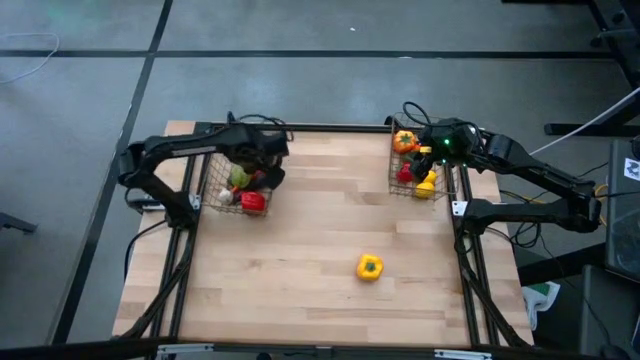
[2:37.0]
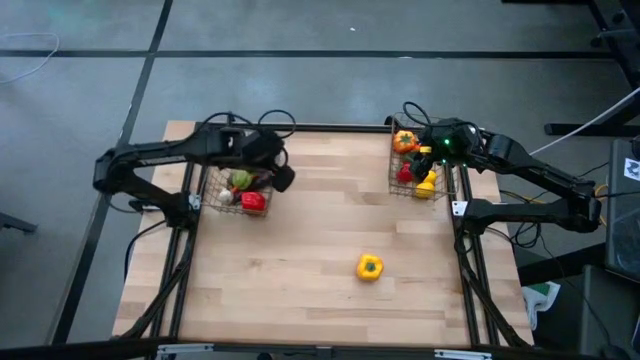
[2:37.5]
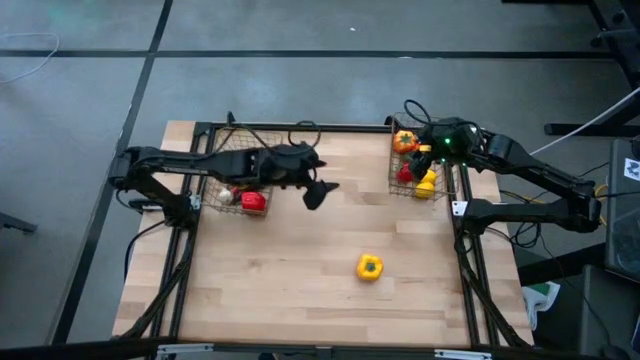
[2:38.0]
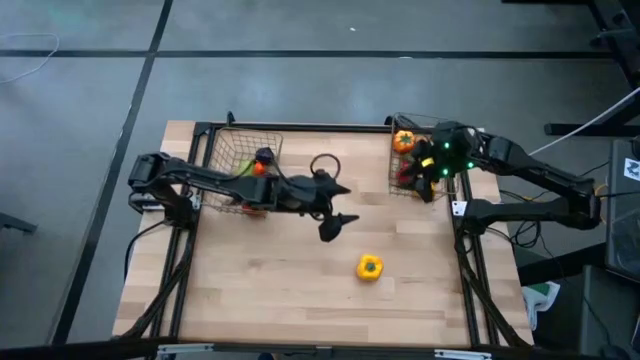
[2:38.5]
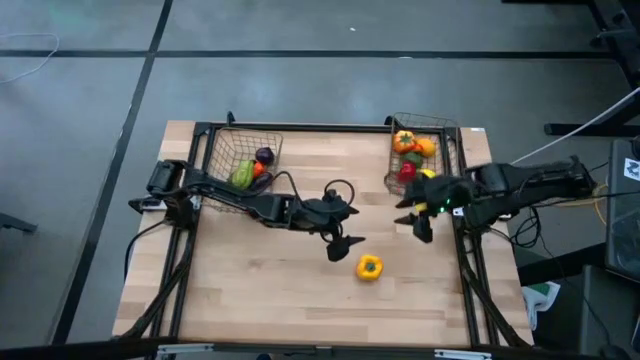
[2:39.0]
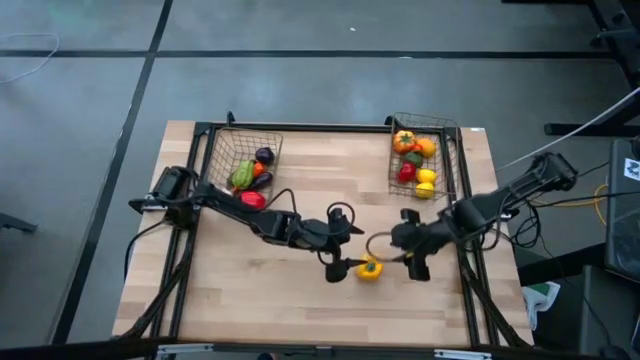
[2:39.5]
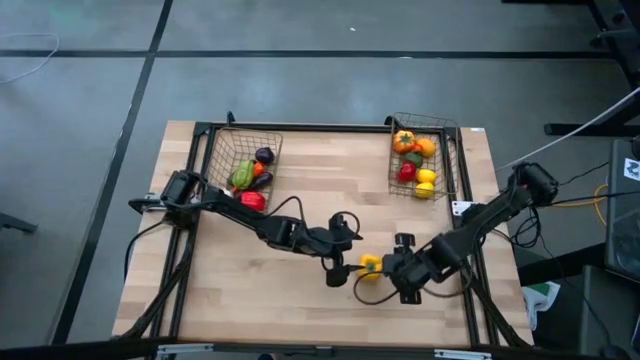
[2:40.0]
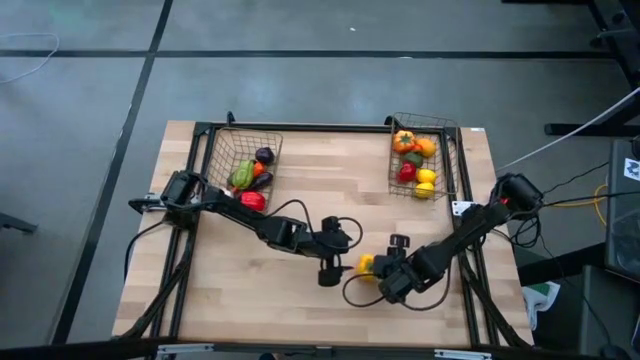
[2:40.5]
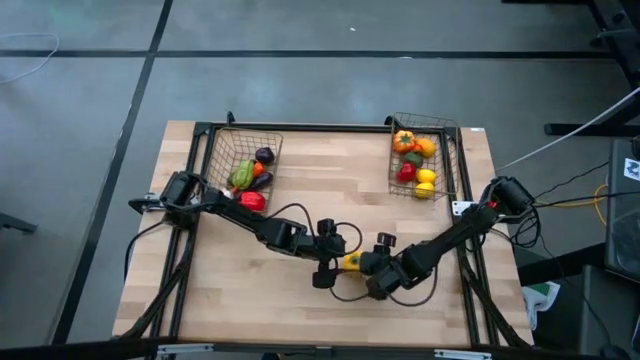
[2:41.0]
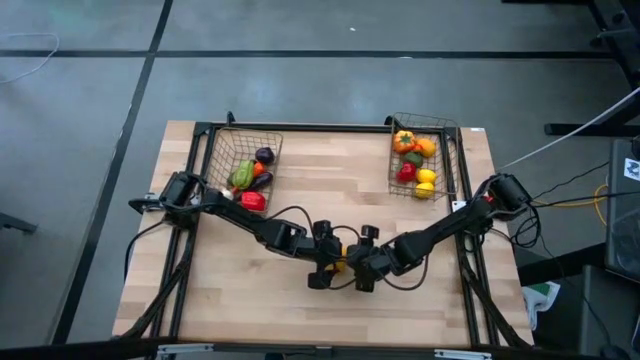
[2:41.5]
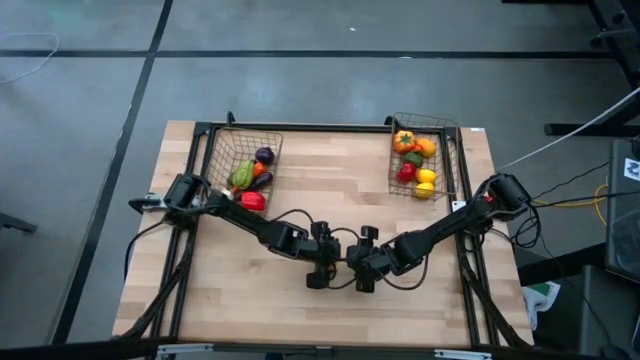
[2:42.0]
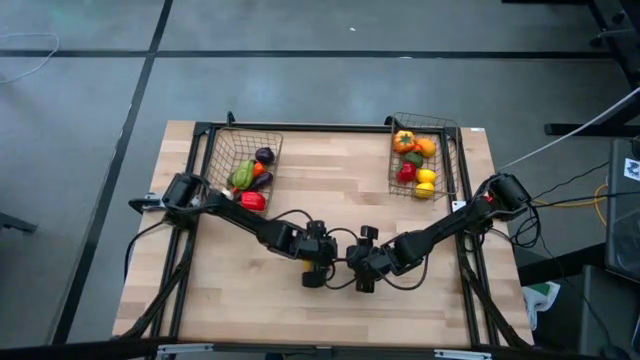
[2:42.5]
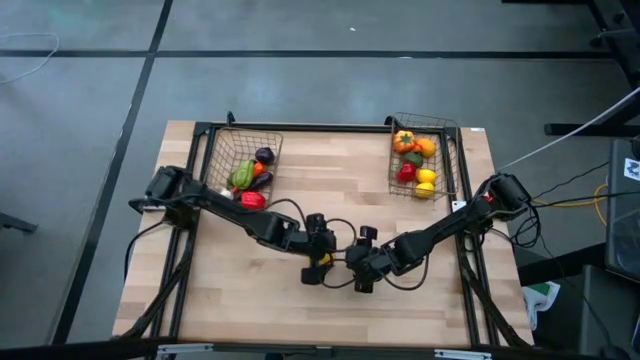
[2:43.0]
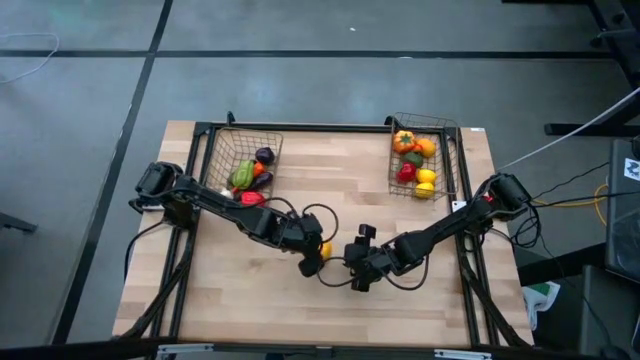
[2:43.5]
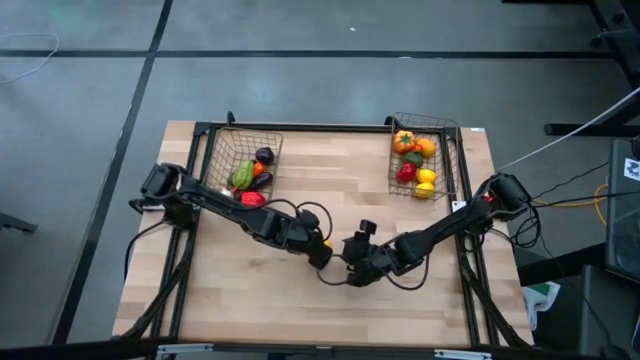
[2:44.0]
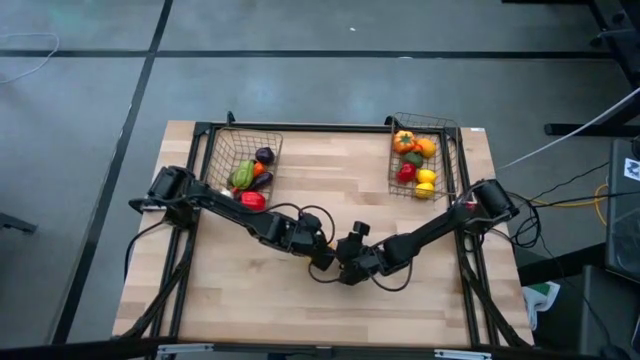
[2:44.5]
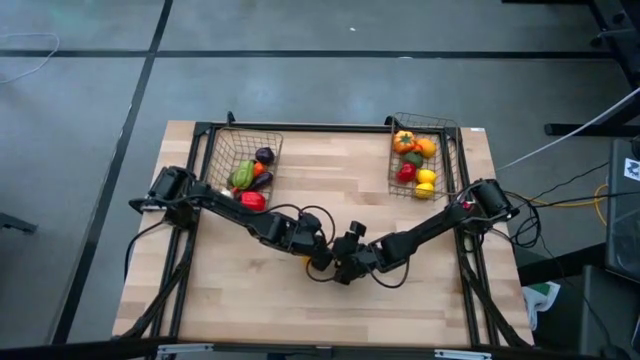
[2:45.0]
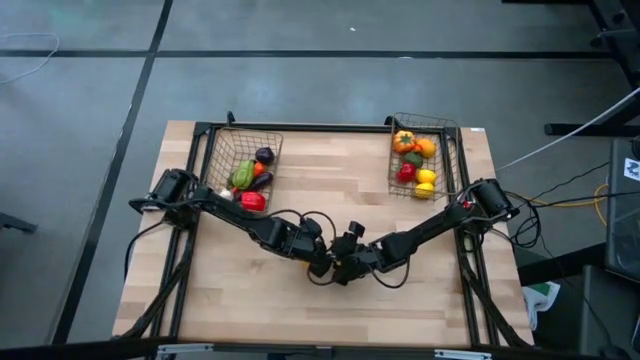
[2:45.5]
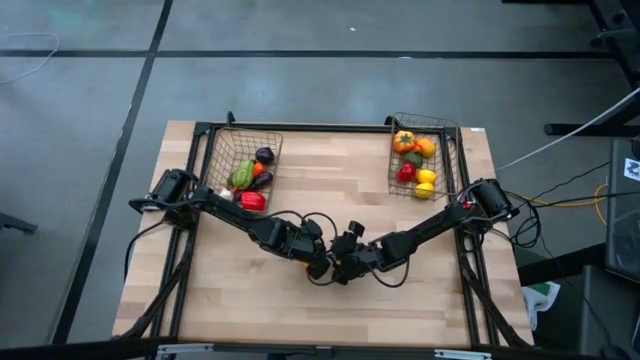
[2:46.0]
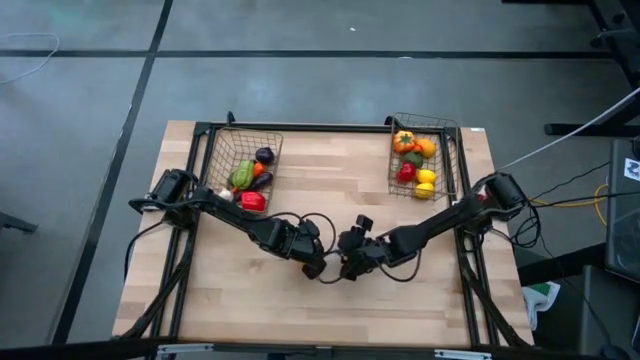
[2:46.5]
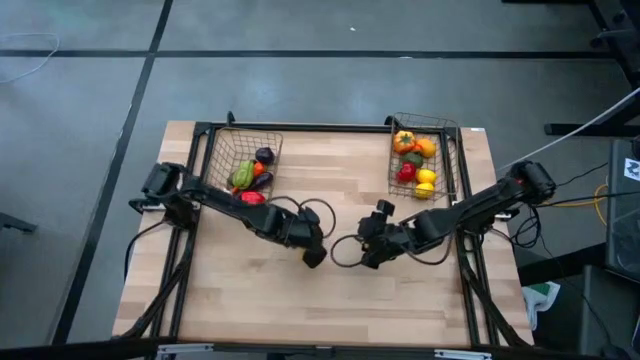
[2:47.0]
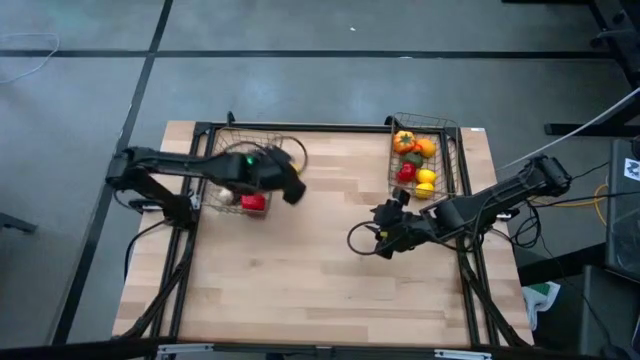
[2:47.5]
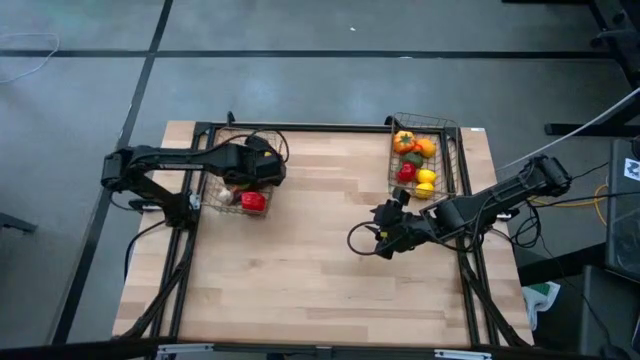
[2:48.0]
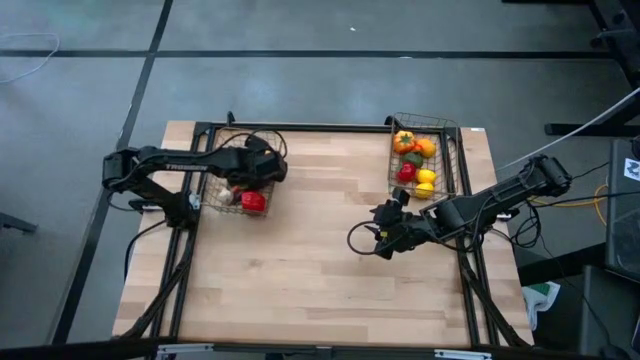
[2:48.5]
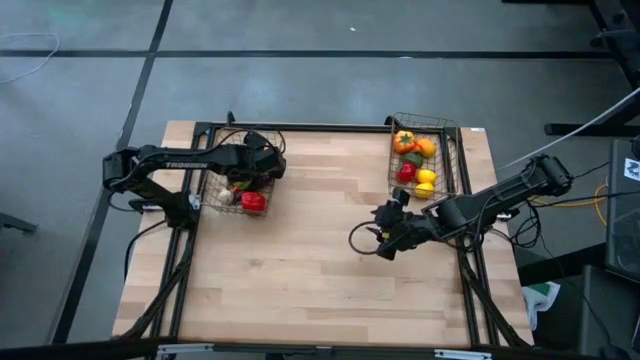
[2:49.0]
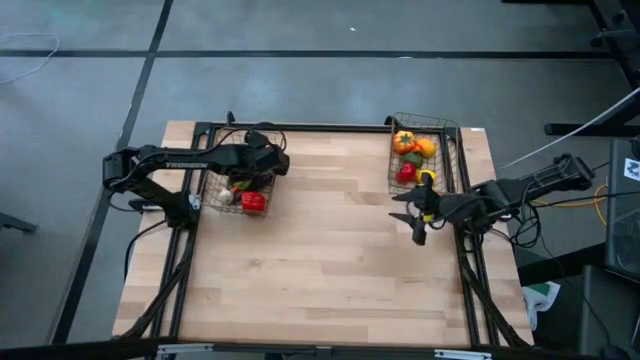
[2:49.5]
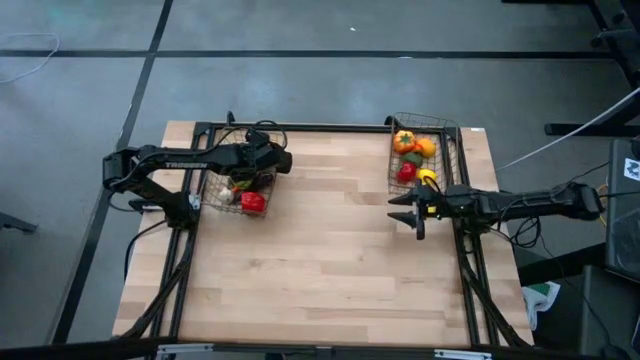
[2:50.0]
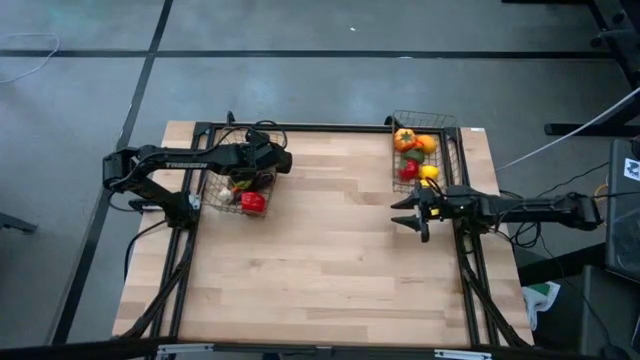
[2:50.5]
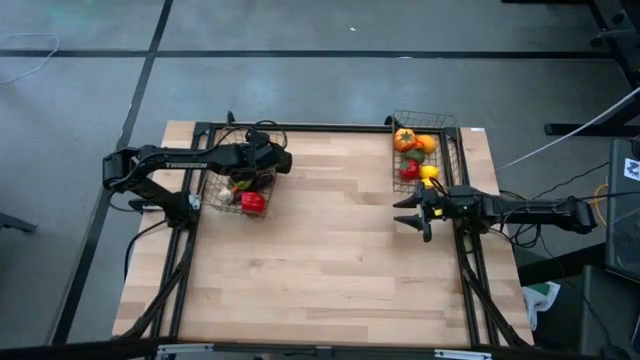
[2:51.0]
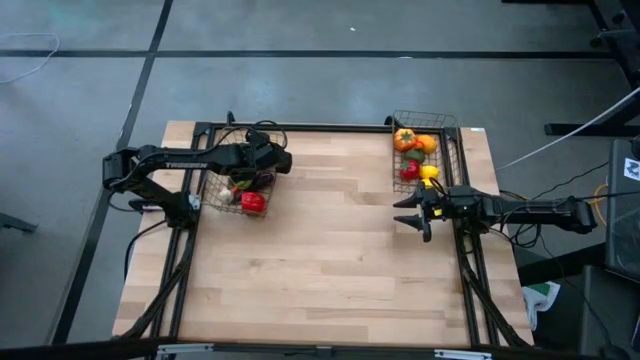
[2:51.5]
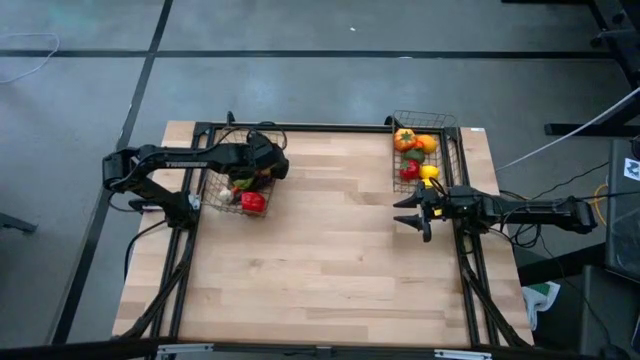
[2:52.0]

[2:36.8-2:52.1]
Task: Sort produce into baskets
Put the yellow bell pepper into the left gold wire basket

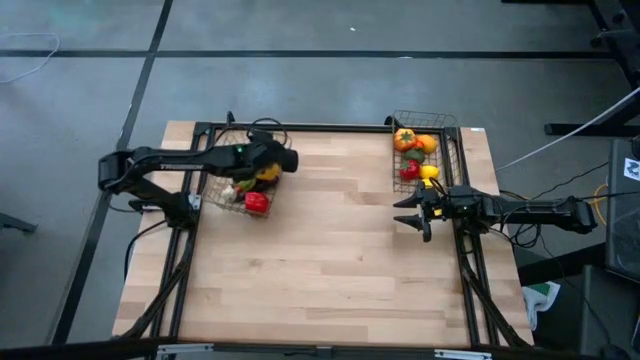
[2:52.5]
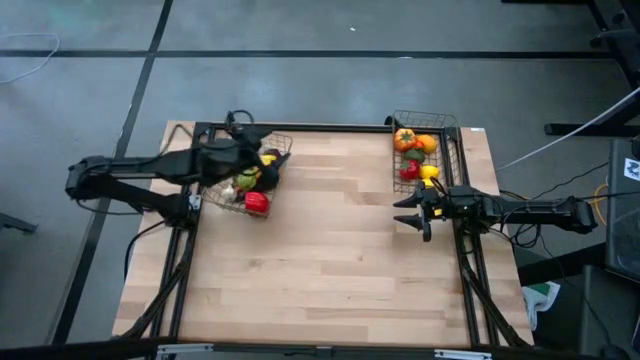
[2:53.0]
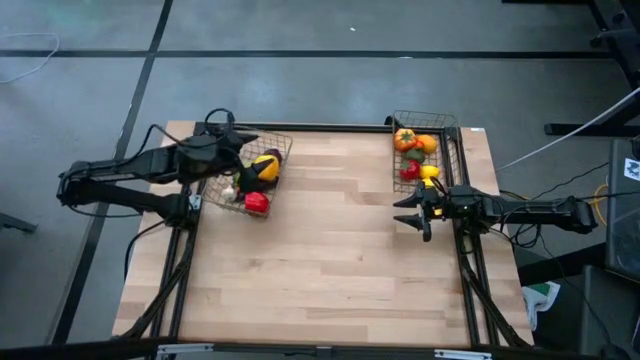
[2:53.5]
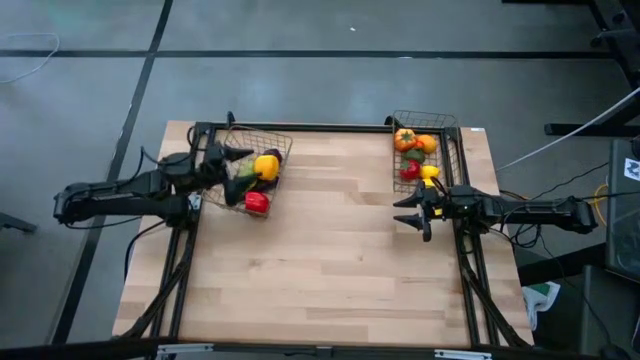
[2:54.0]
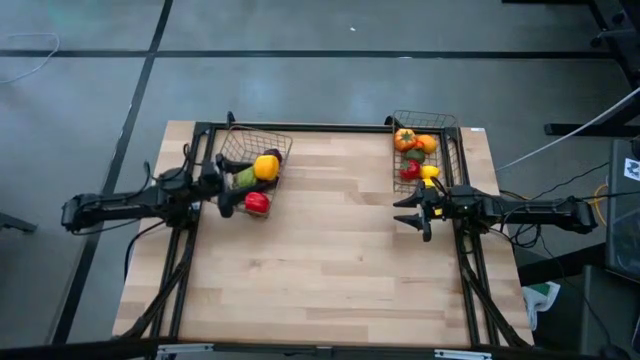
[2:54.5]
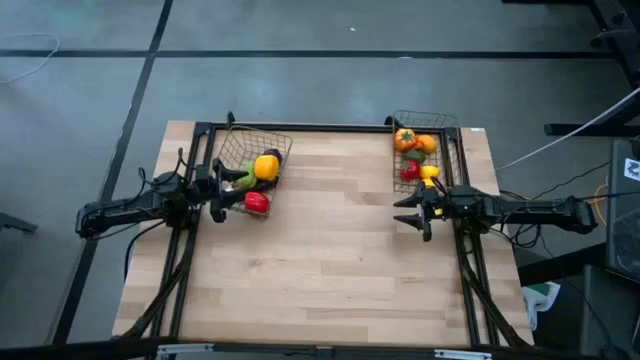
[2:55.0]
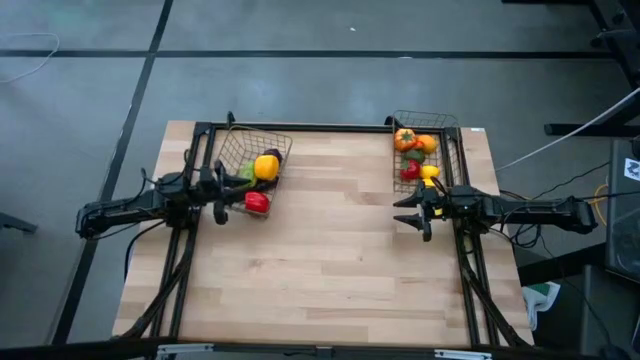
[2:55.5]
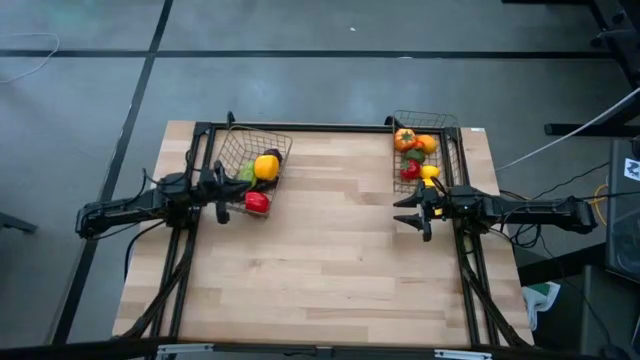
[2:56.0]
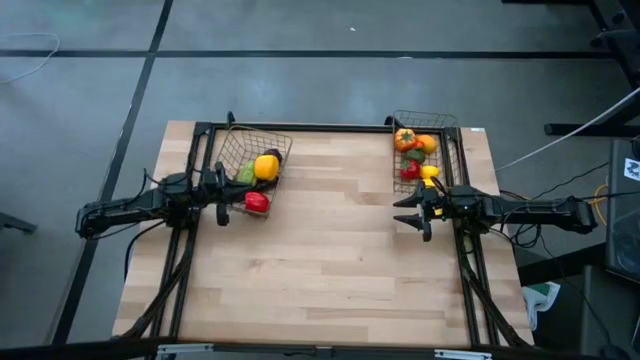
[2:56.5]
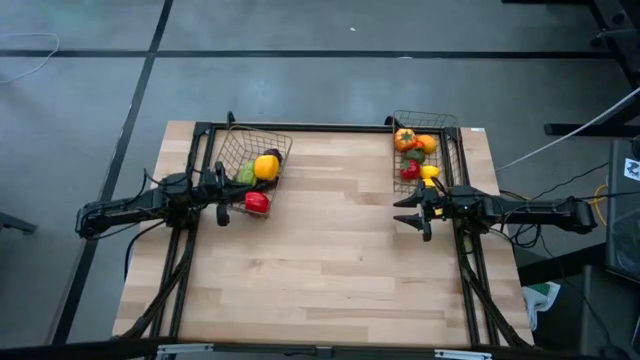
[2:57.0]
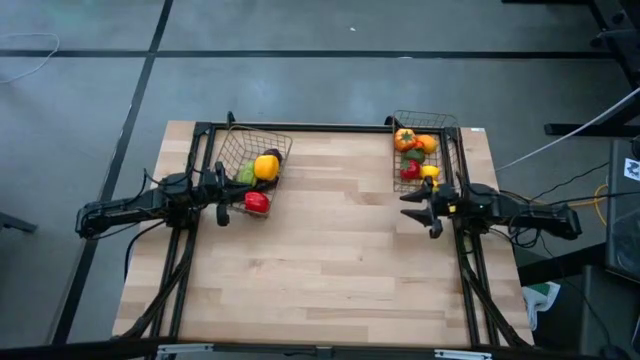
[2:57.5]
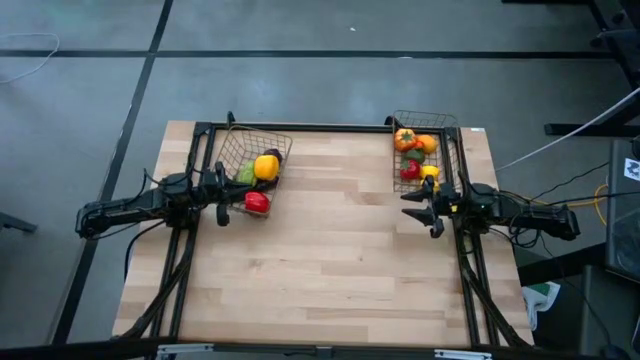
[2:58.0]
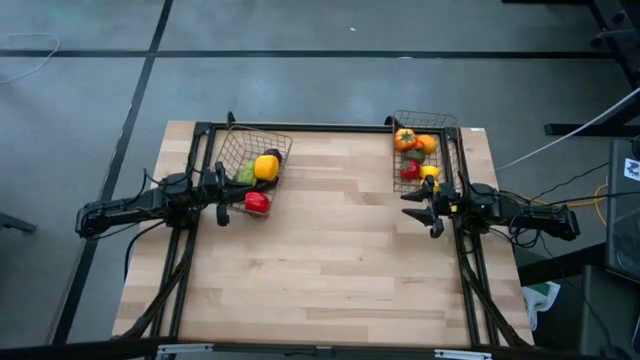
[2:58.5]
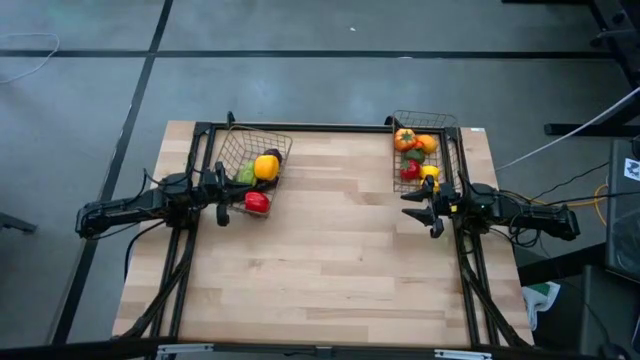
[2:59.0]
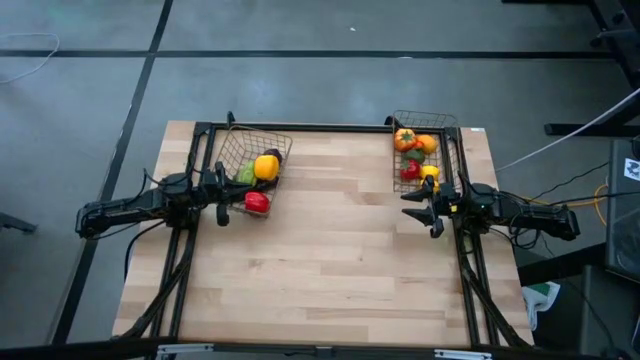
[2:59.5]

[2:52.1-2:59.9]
Return to Home Position
